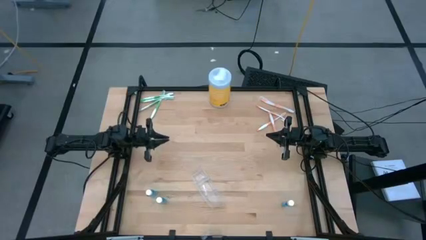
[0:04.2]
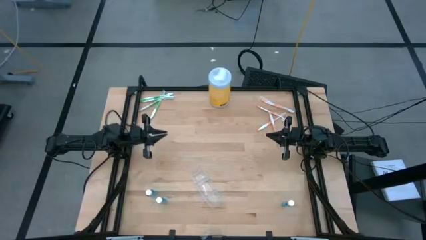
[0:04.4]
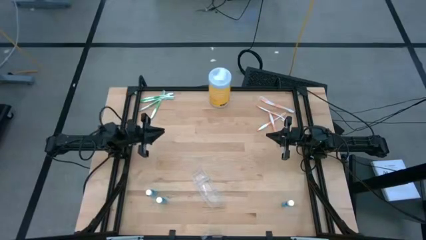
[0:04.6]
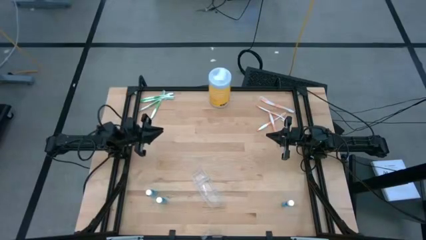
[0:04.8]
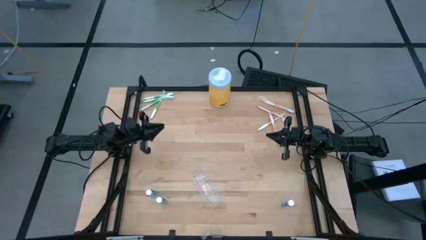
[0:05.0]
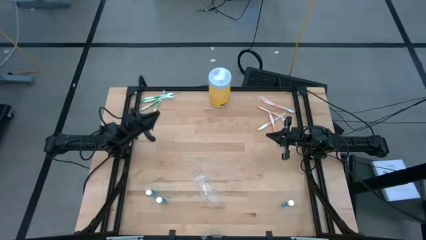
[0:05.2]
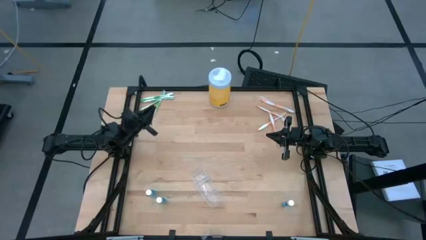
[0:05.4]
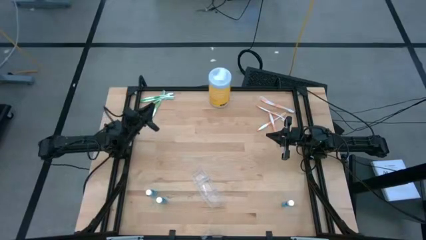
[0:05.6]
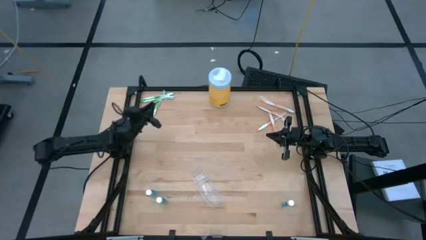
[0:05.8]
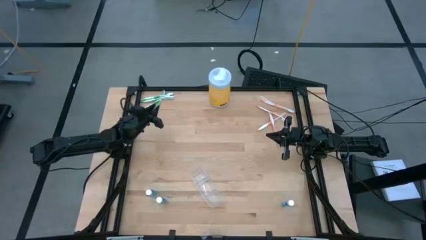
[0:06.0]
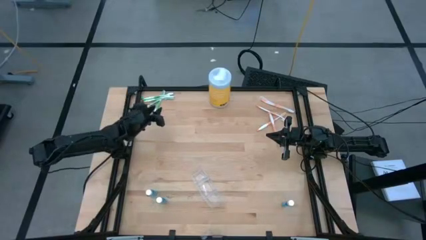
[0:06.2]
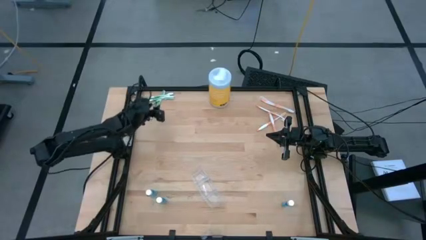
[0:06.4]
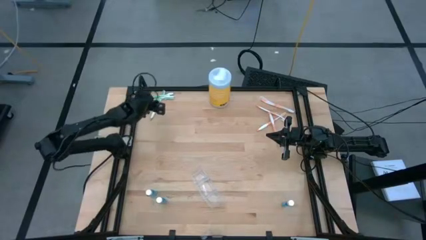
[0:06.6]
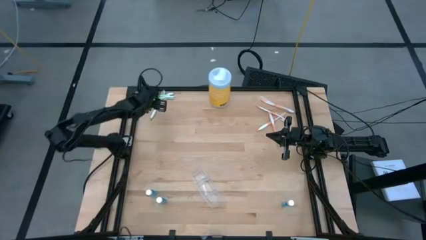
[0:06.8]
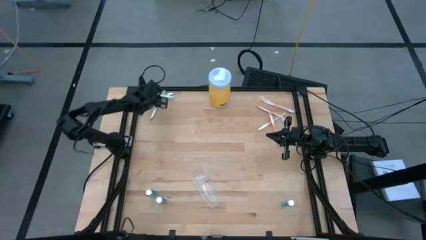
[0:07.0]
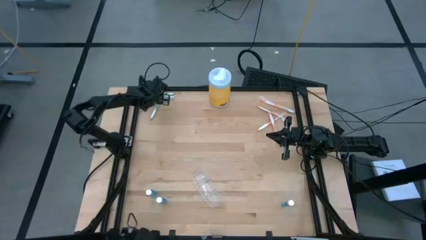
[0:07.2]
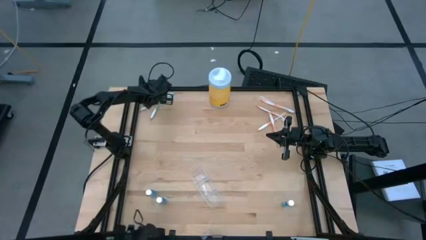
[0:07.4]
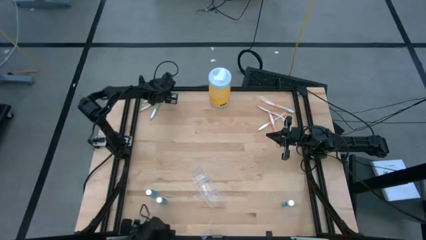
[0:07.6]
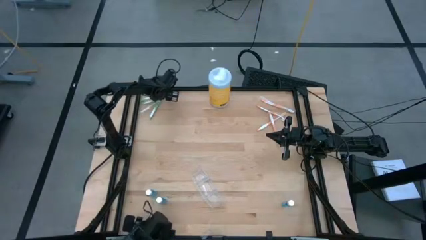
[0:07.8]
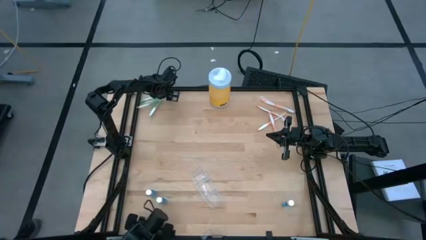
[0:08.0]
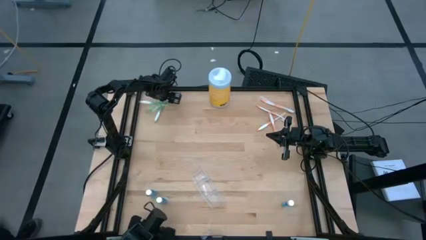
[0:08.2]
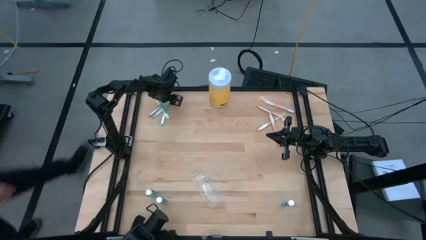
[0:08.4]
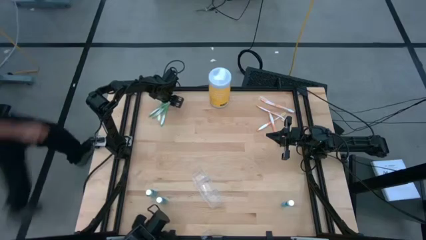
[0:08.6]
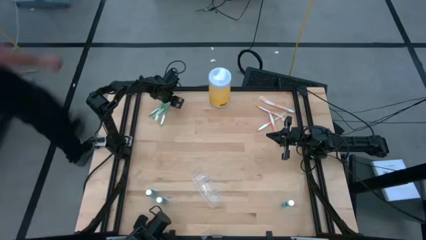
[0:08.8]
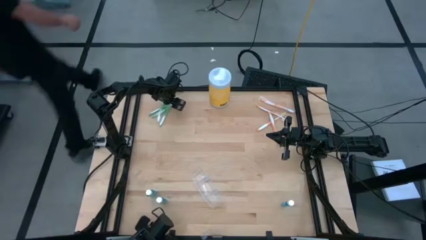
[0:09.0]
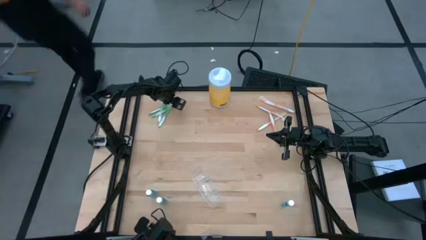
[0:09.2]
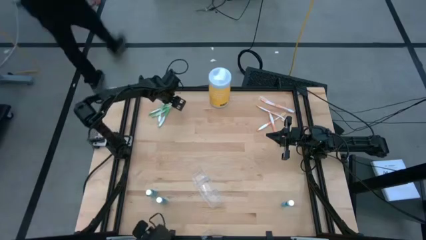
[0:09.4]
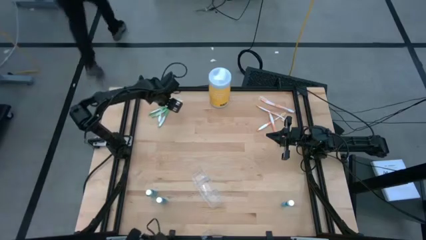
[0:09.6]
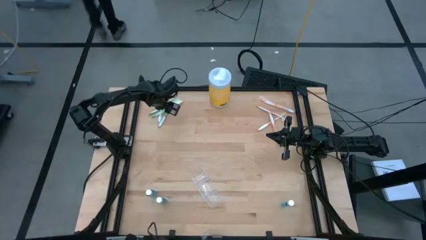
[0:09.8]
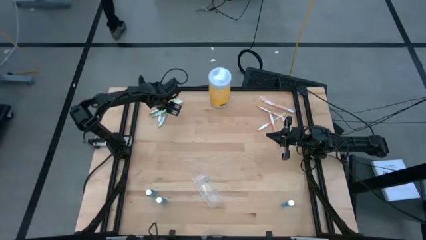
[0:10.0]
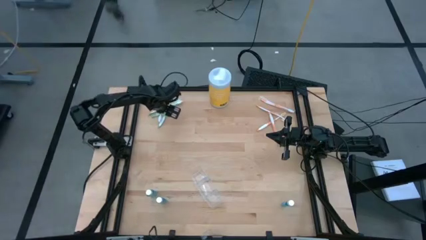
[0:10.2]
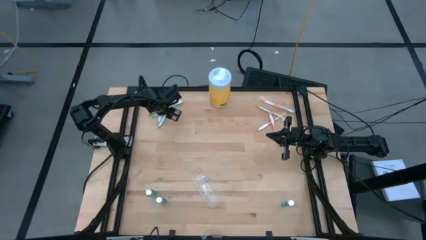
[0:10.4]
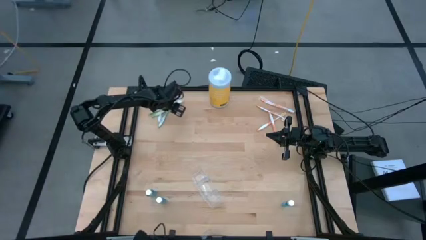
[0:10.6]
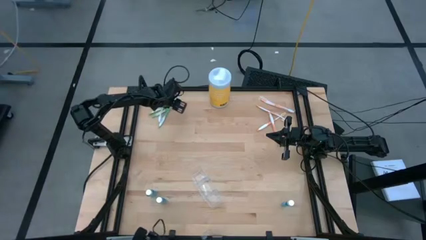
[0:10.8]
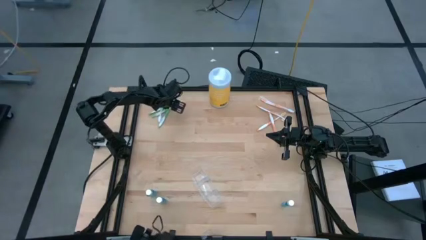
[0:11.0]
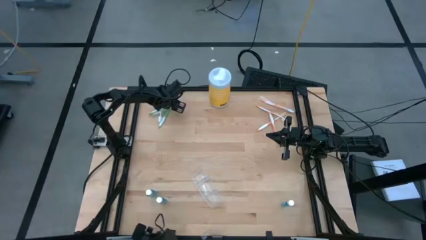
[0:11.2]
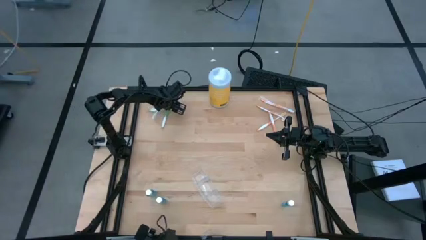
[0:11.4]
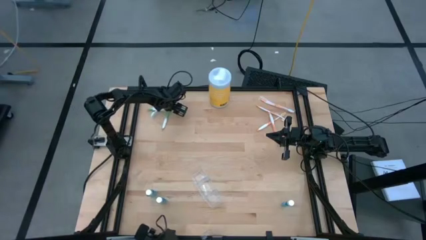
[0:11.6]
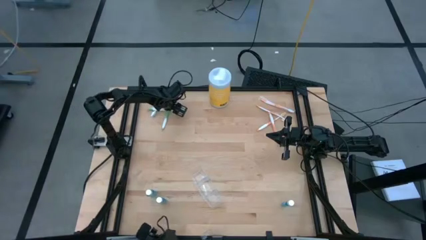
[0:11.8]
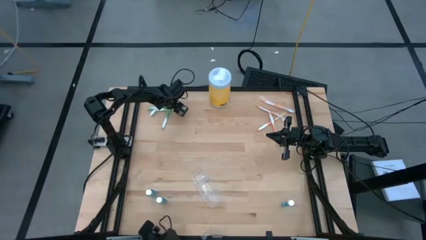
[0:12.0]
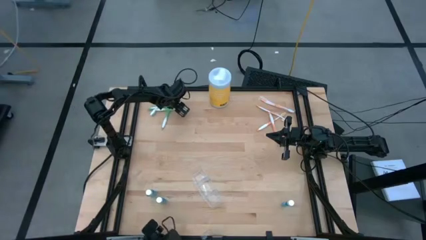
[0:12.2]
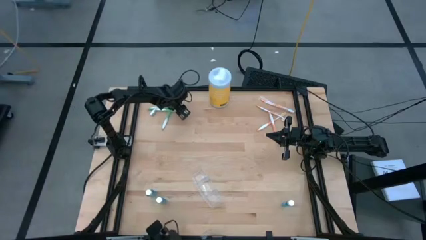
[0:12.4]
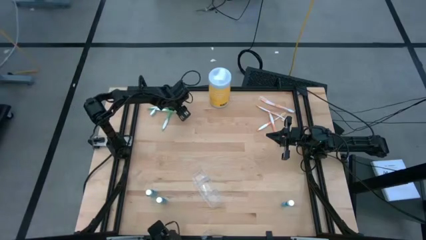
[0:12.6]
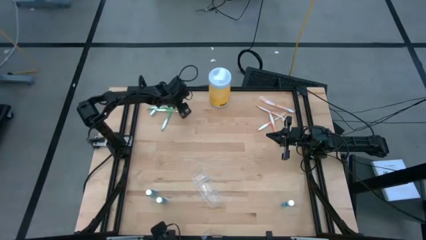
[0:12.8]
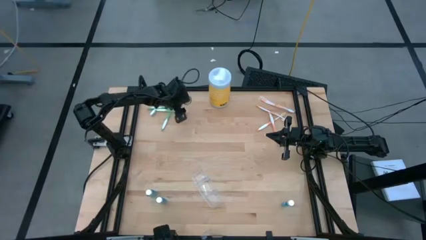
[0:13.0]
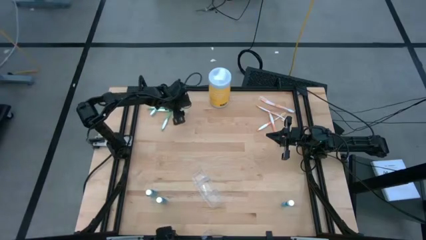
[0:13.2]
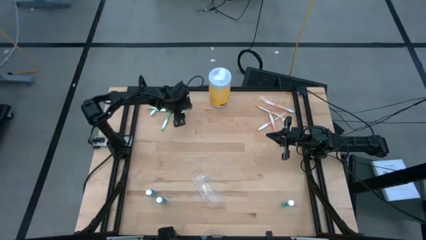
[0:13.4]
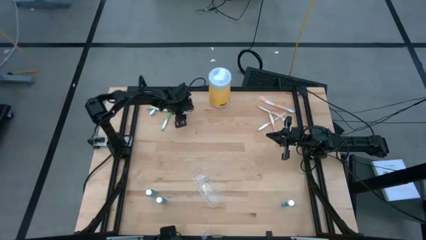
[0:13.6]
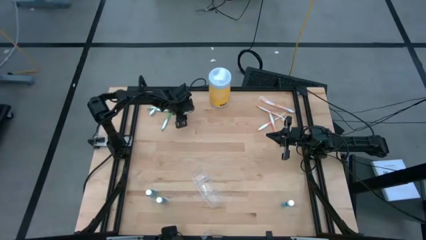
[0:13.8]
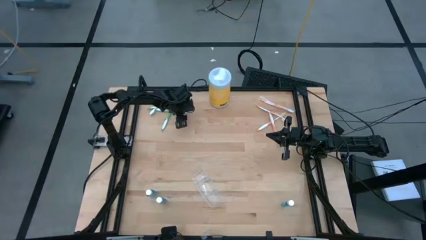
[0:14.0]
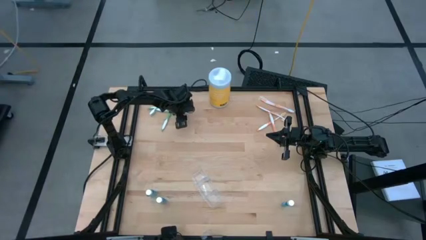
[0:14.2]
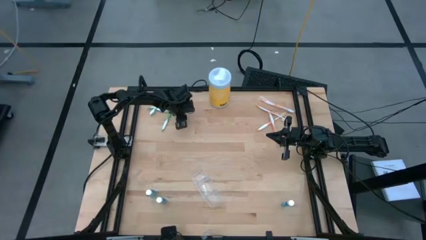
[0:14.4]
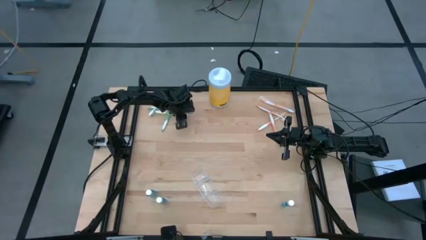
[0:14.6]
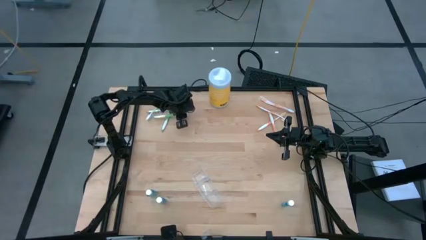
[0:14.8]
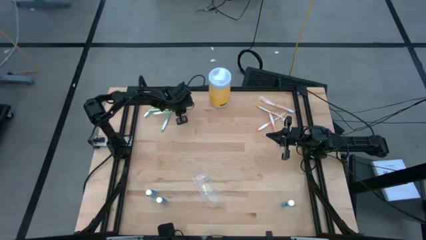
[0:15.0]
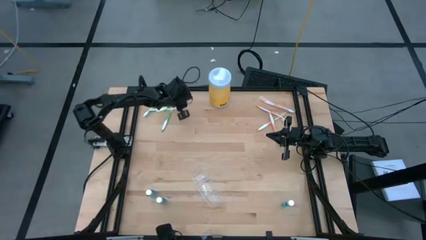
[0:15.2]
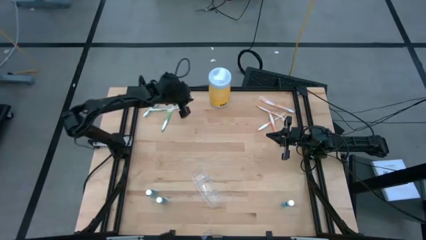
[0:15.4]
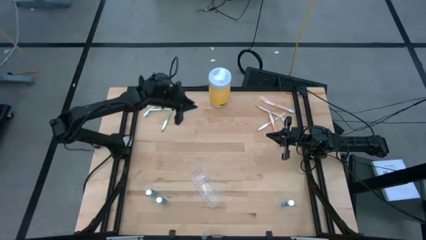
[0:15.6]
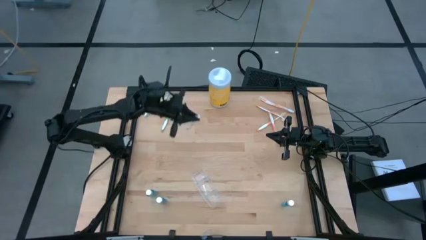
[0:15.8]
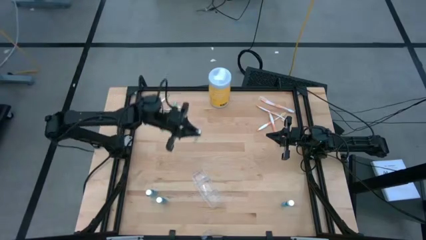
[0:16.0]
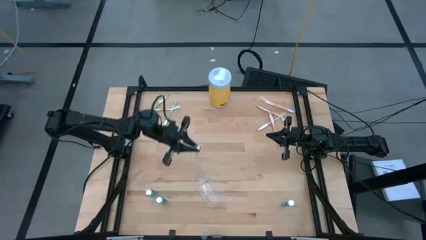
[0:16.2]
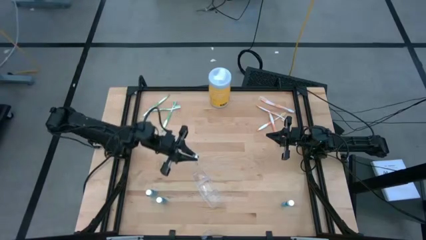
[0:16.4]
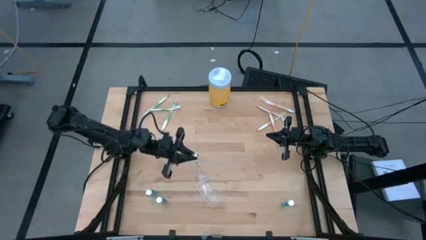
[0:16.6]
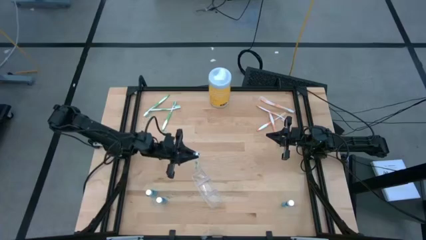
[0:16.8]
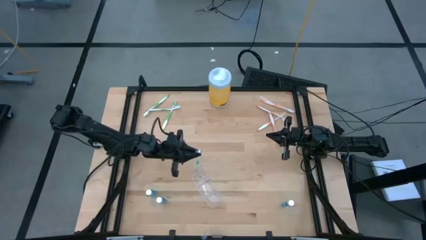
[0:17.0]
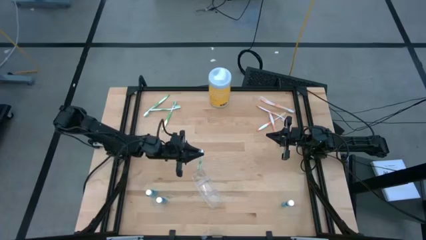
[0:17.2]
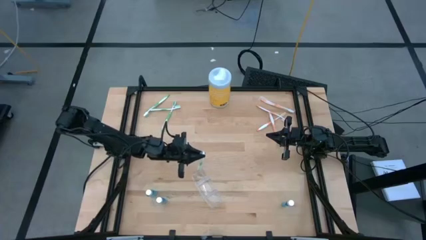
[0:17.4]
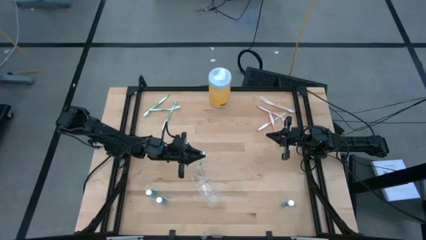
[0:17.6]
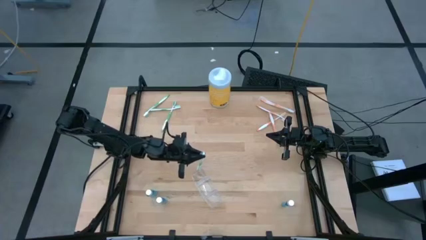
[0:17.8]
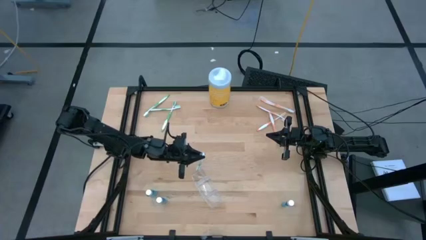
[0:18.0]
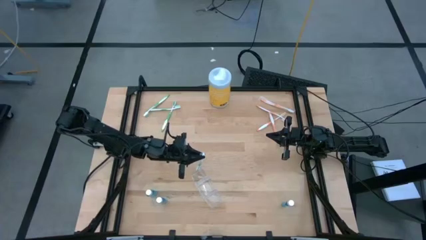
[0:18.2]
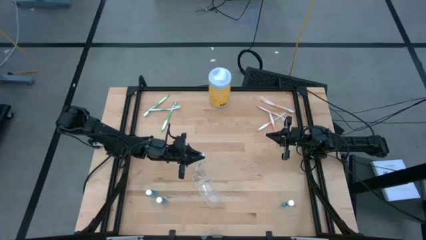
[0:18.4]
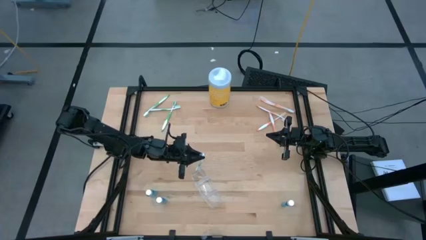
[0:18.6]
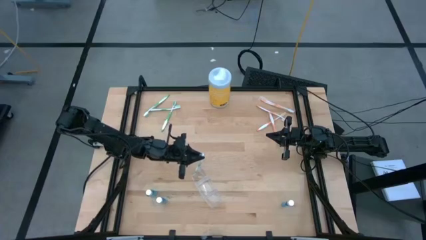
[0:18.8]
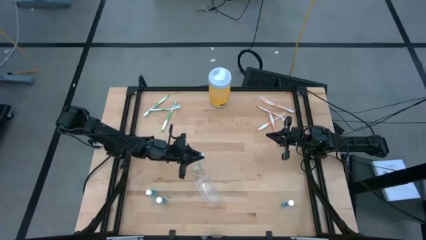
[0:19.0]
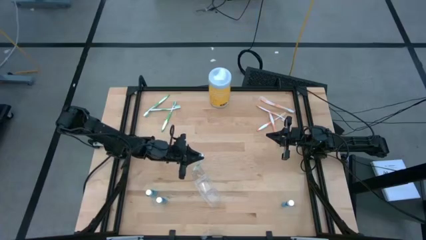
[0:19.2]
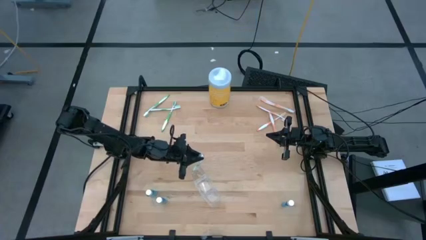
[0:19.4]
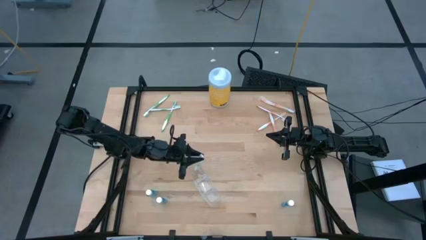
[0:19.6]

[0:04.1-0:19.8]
Task: Pick & Place toothbrushing station
Put the green toothbrush into the transparent organizer
